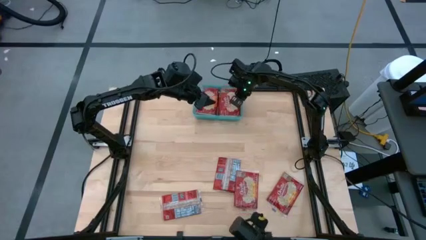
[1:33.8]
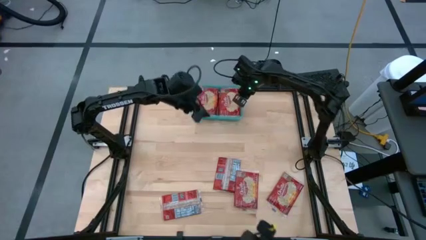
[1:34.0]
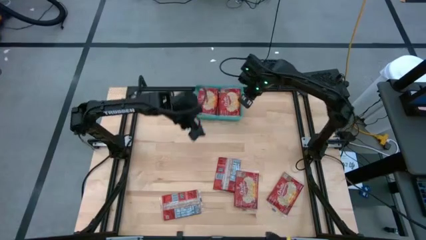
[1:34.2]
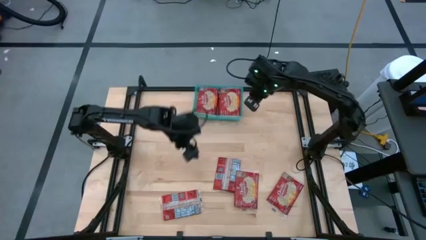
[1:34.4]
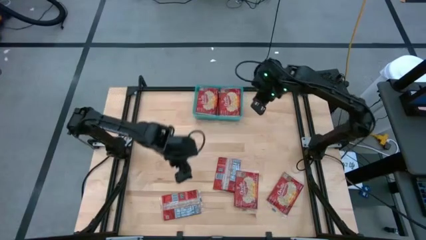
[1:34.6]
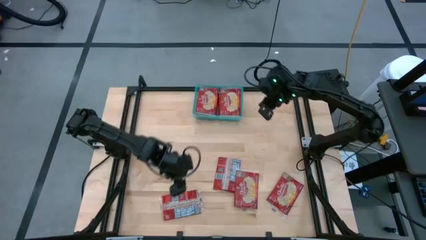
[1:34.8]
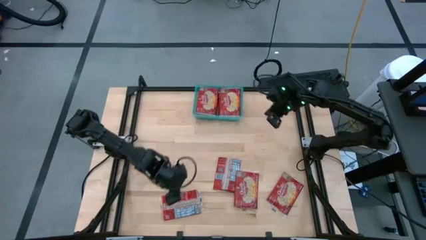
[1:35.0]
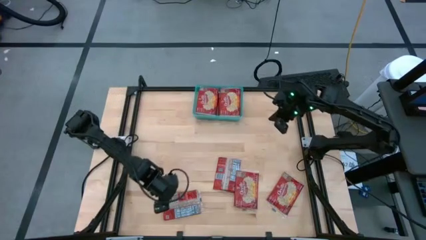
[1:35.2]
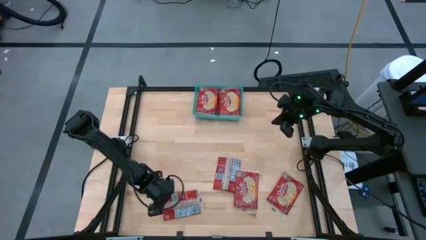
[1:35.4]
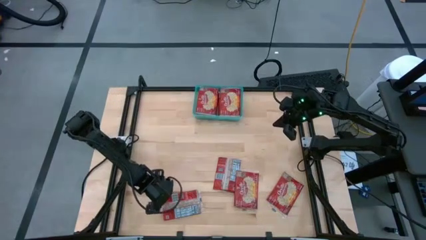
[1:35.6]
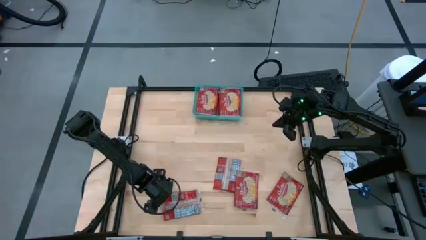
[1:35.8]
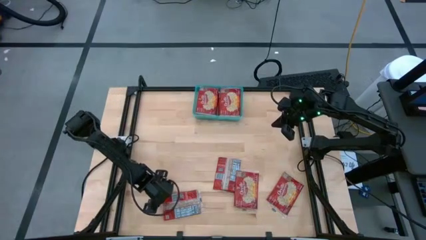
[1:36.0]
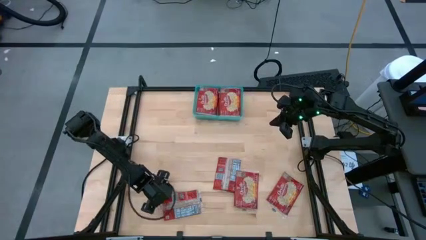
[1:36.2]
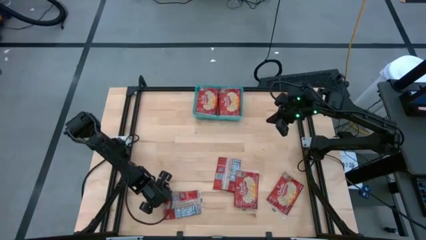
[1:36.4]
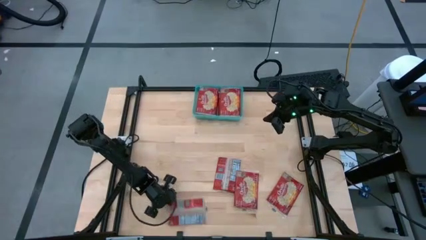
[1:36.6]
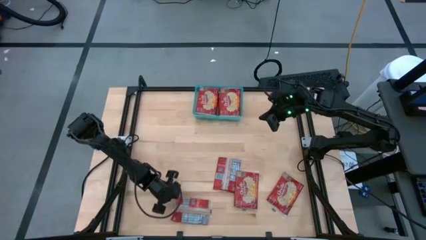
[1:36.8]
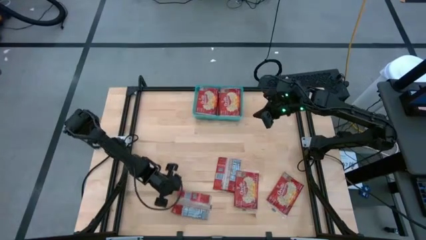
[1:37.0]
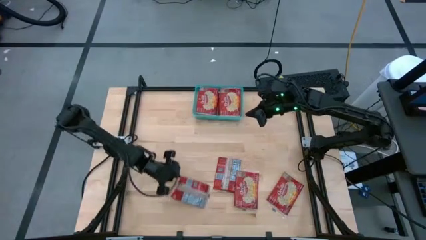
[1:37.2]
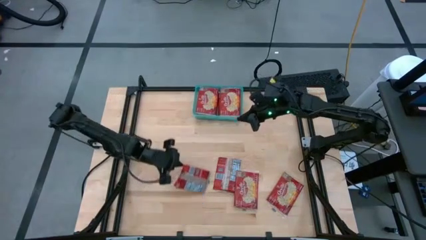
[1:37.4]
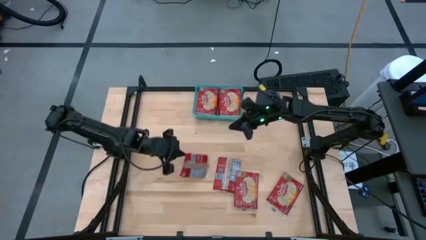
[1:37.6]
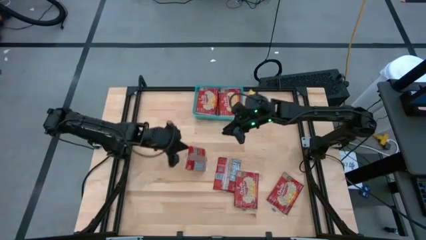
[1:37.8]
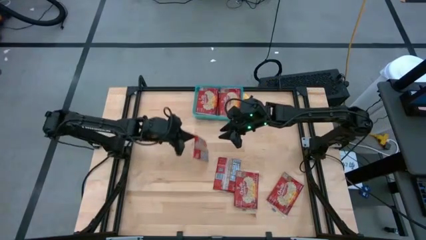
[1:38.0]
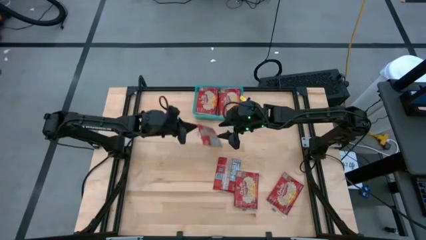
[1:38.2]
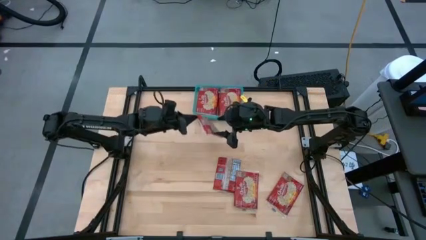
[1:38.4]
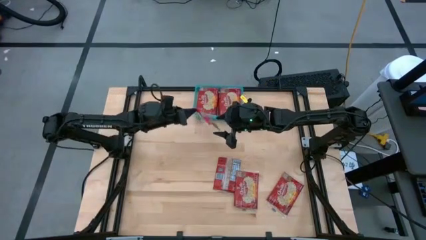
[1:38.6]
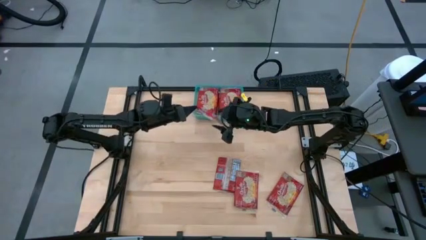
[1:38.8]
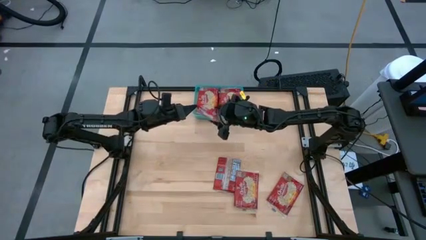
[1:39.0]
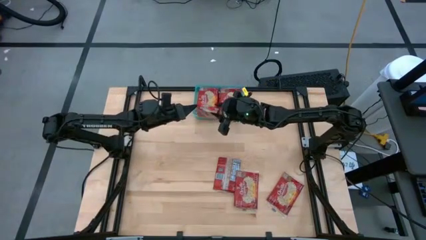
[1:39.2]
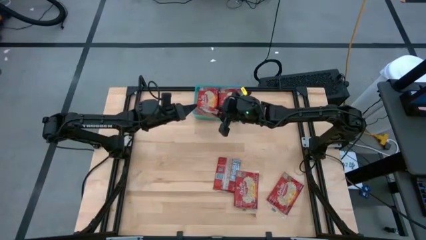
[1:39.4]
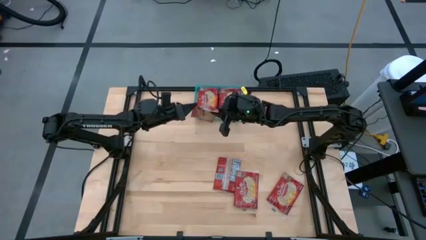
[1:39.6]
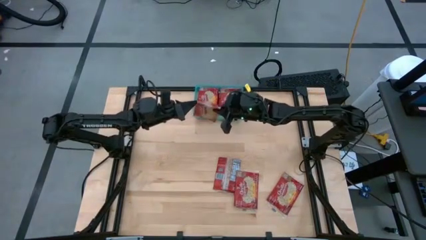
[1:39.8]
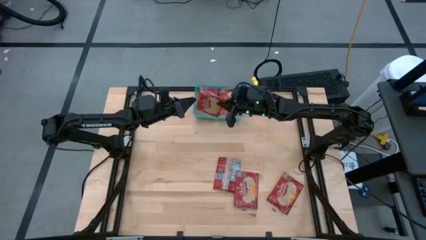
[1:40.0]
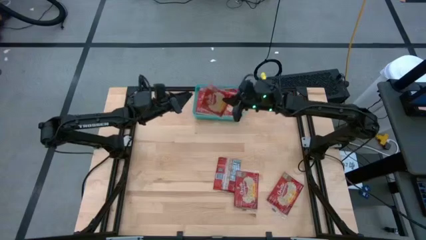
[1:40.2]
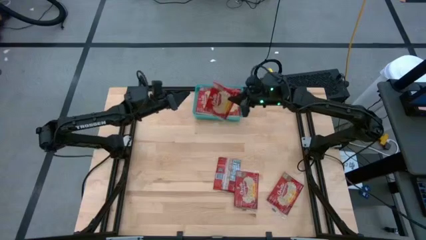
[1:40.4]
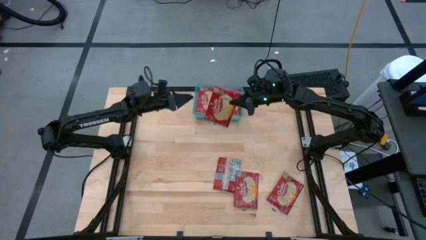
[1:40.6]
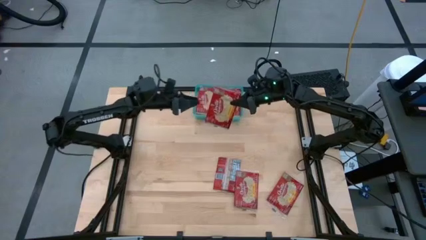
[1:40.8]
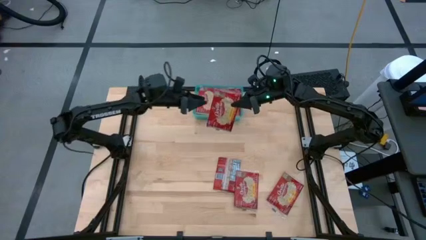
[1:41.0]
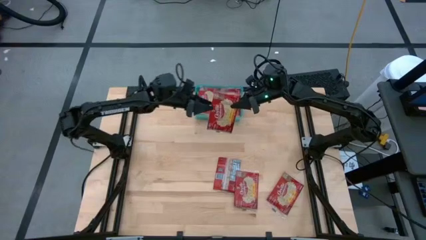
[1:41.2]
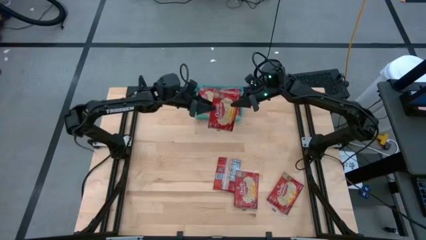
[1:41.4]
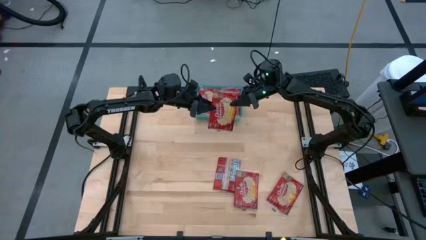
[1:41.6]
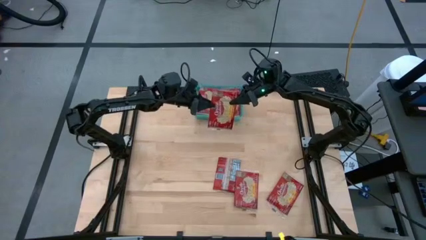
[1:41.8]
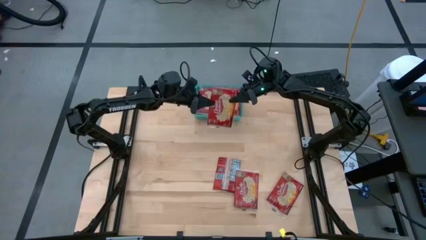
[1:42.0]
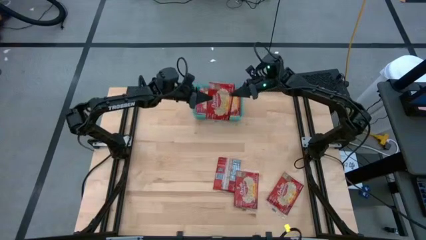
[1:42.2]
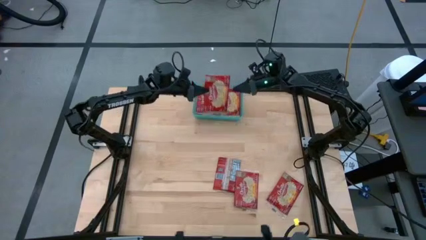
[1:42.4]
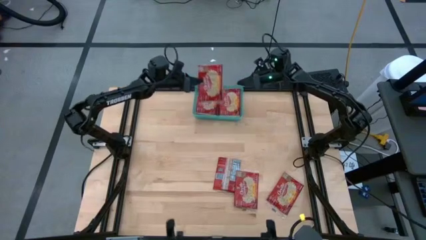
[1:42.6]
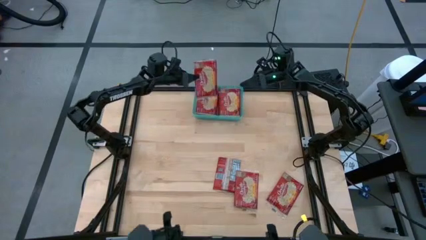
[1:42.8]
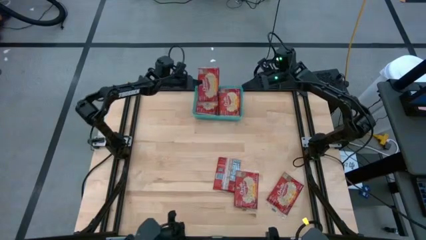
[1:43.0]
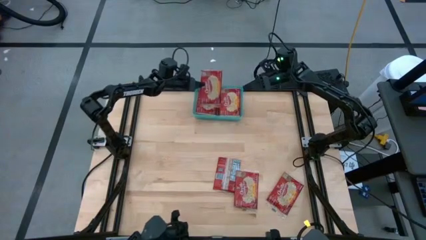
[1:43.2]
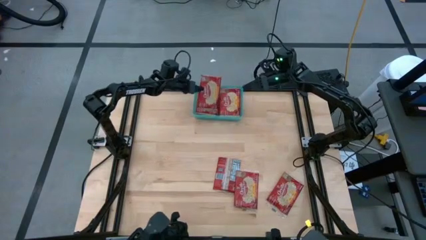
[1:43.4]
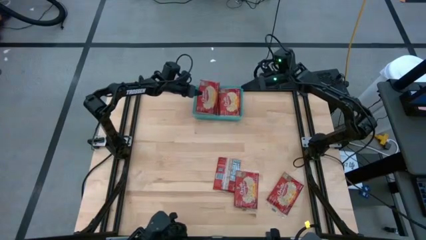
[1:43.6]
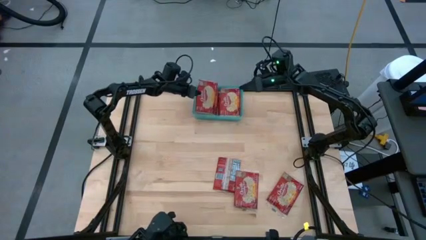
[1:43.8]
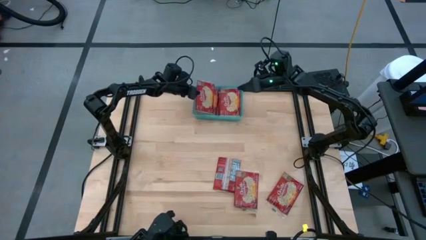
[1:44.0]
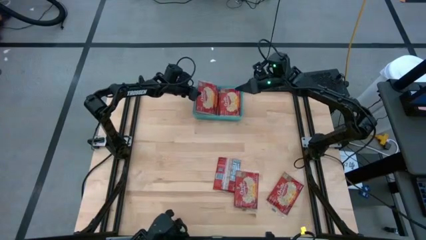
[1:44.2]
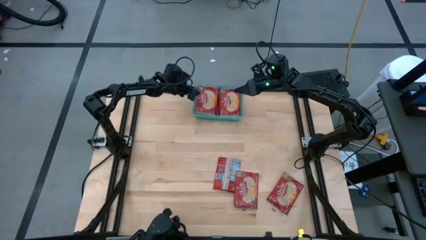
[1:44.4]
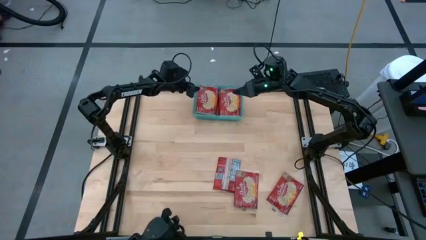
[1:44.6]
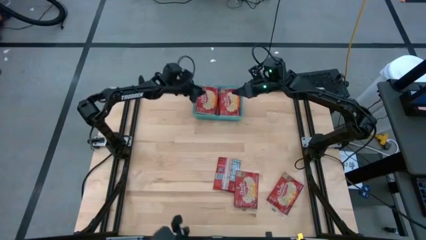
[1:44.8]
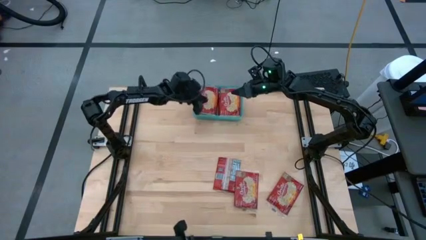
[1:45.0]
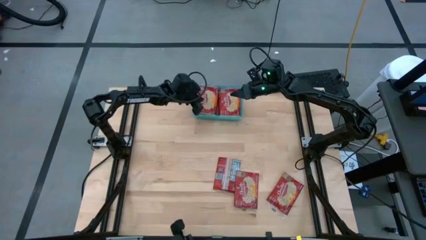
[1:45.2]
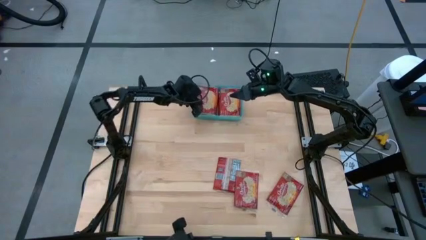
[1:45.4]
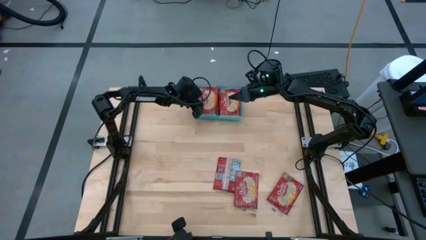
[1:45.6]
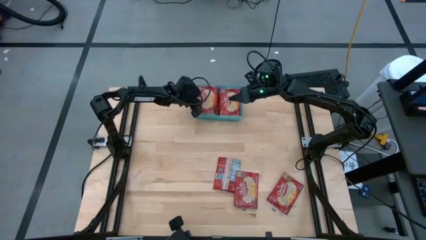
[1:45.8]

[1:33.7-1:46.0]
Task: Sort popcorn bags into baskets
Put the red popcorn bag into the blue bin
